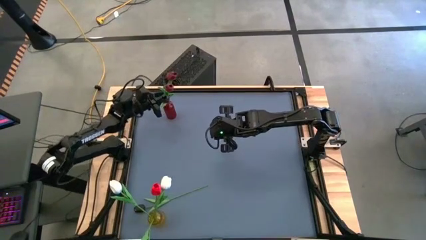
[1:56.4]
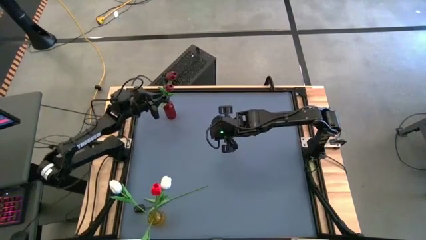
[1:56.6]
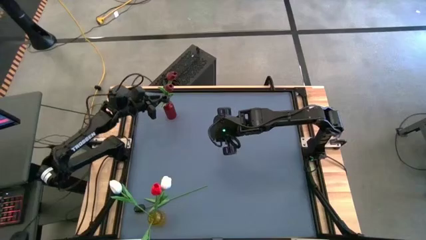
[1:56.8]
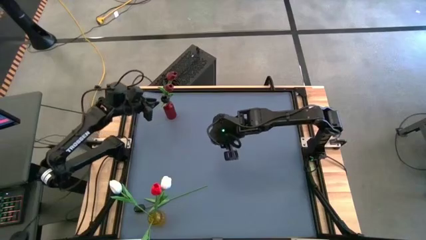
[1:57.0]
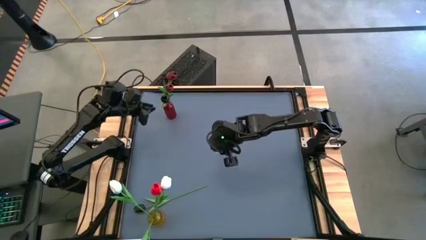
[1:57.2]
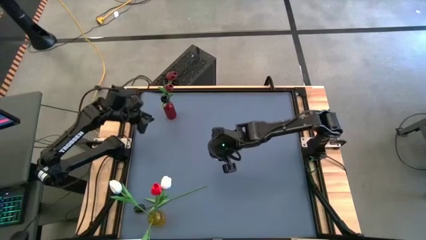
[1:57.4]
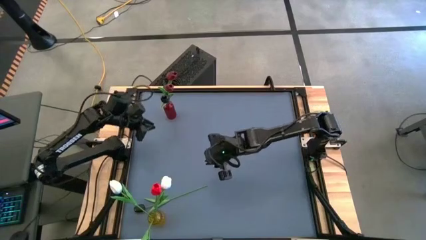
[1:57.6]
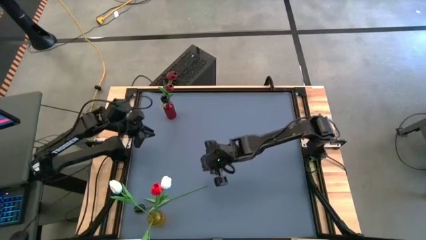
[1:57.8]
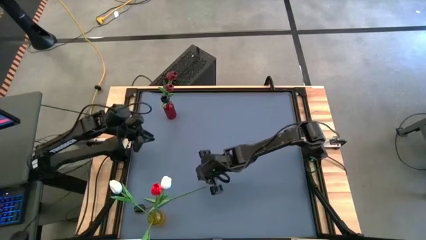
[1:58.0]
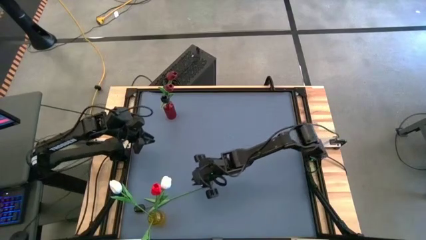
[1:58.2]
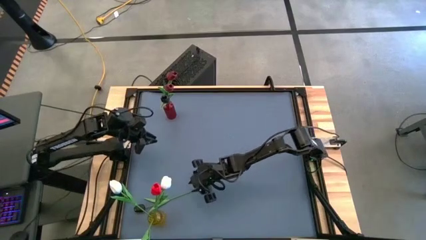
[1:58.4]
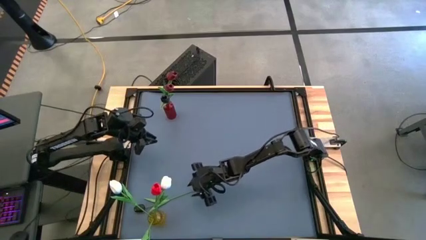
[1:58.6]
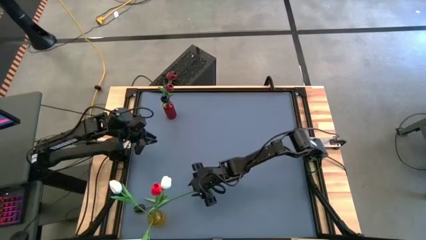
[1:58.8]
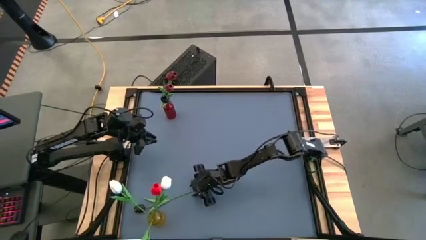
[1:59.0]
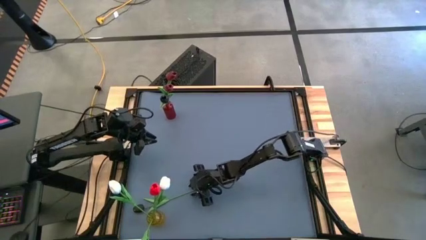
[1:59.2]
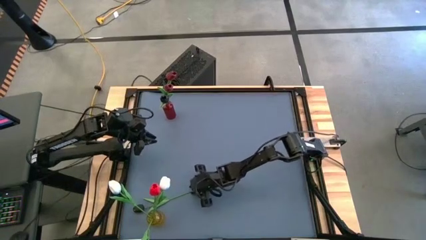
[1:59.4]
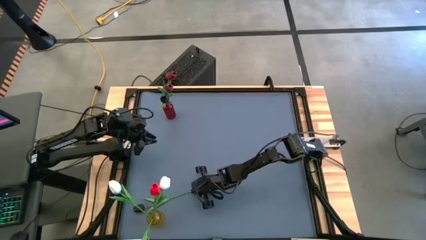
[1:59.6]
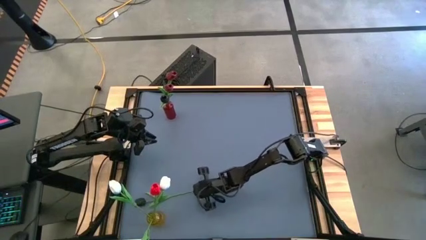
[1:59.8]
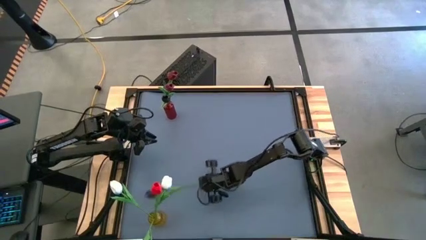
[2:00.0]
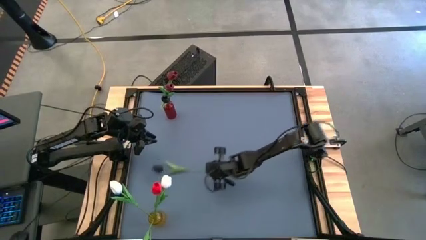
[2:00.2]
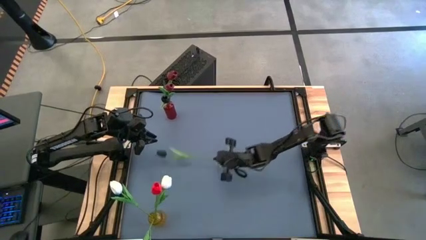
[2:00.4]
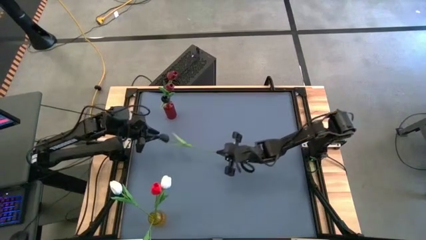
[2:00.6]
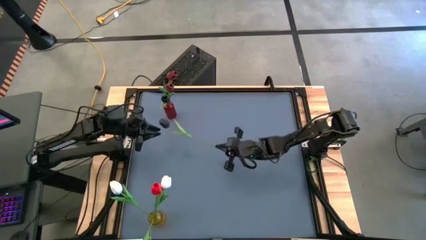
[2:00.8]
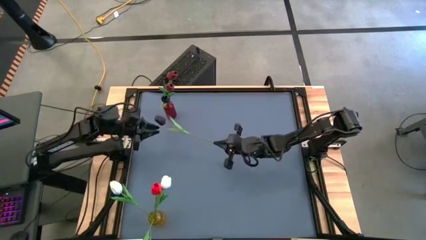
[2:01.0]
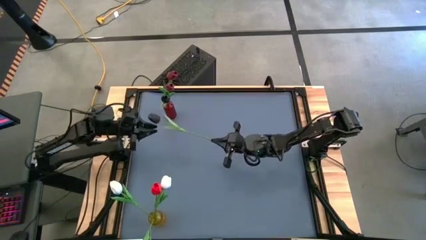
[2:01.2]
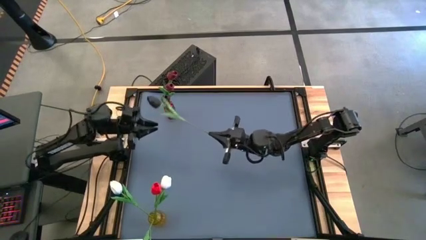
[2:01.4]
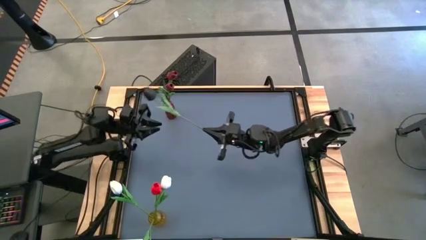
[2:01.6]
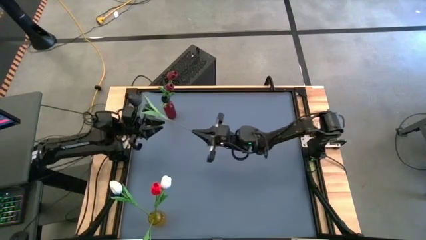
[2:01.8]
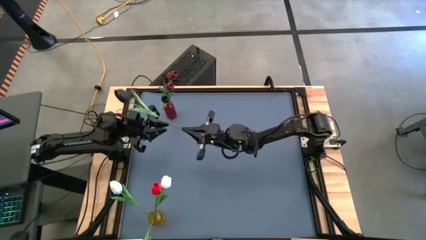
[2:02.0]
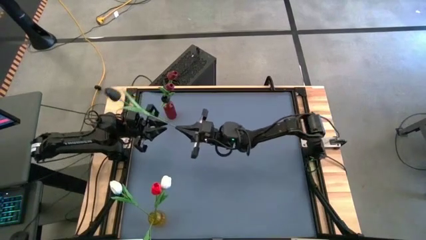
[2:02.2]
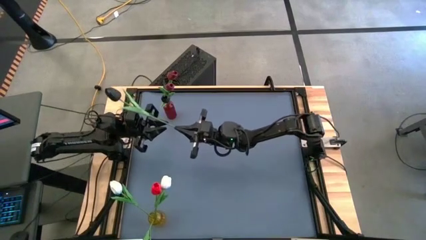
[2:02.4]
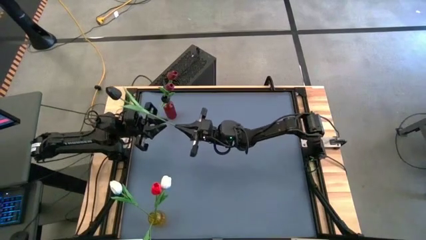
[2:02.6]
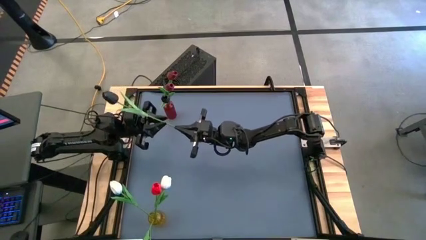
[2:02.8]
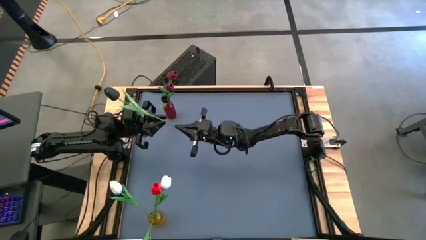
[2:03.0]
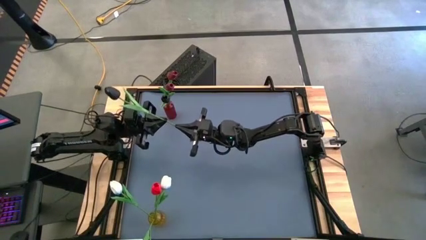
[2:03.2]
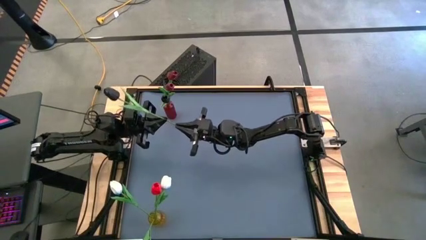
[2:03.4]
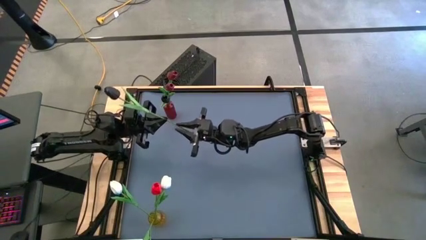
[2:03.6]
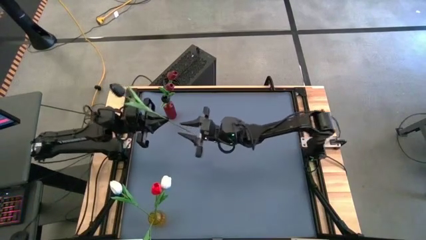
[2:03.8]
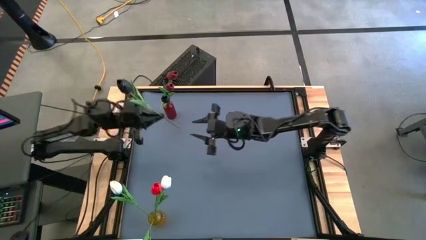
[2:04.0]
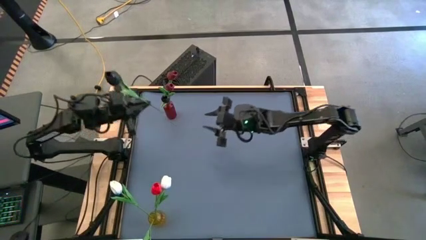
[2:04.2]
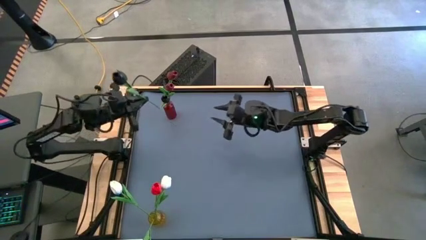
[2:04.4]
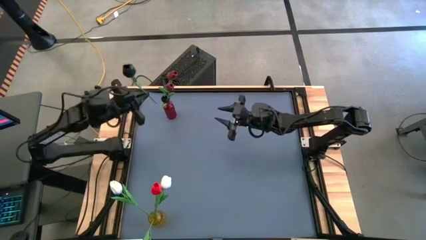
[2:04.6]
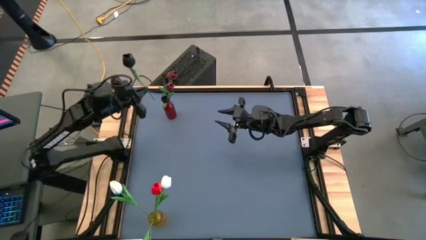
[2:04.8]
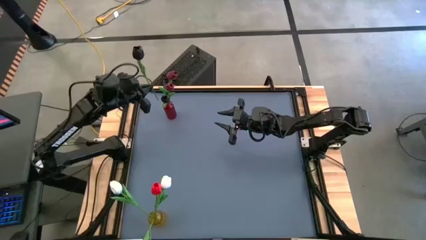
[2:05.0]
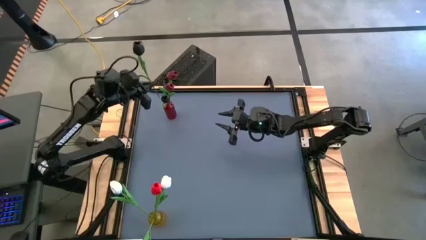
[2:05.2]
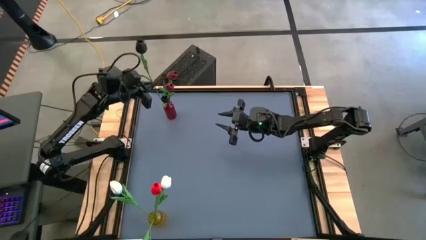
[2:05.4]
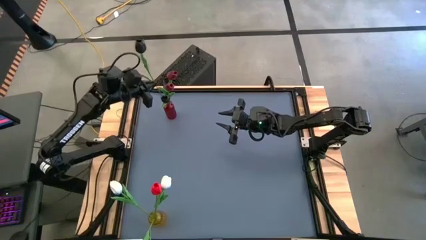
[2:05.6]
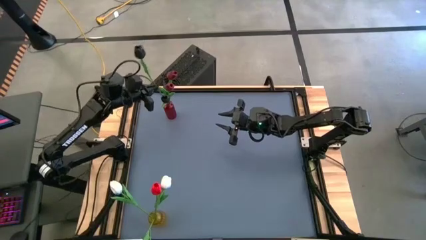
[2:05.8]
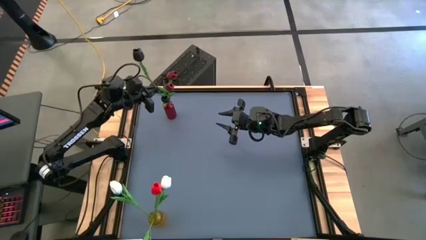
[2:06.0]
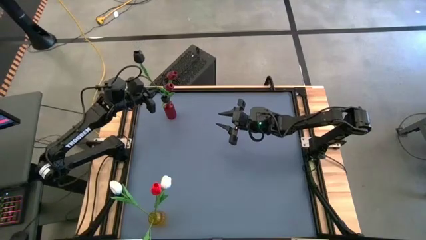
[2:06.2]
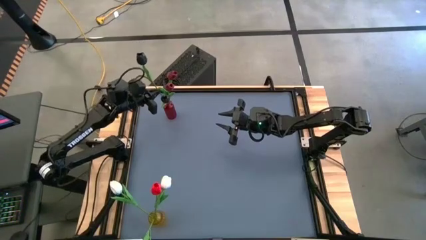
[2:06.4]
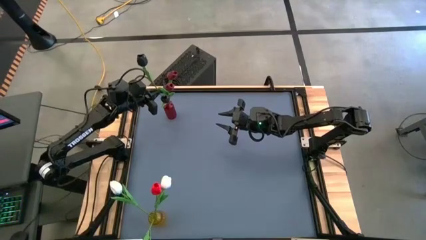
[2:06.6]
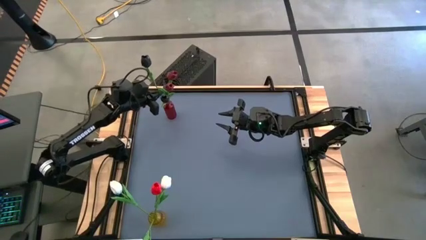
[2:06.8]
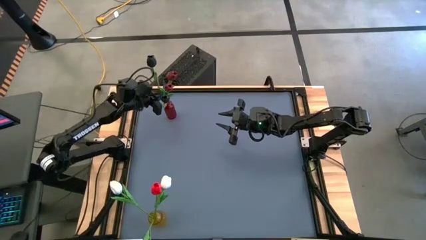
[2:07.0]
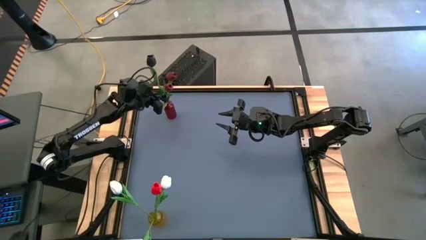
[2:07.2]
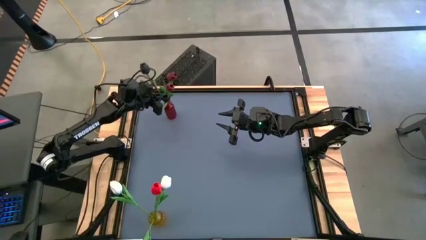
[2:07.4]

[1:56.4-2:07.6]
Task: Sort flowers into vase by color
Put the black tulip into the red vase
